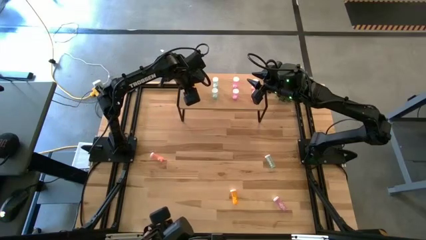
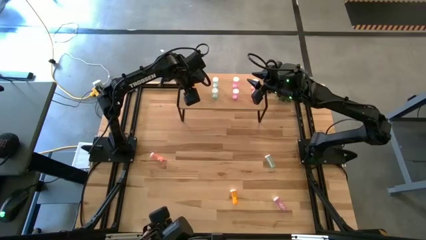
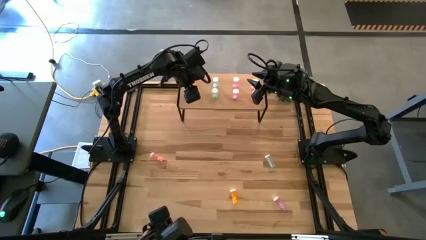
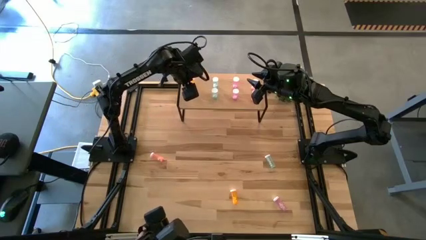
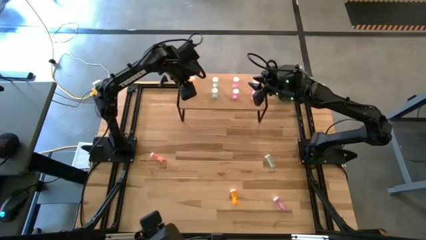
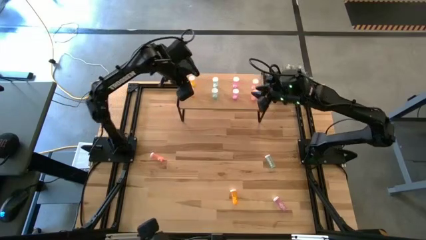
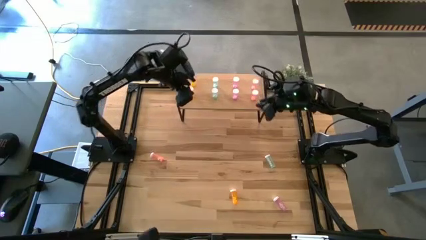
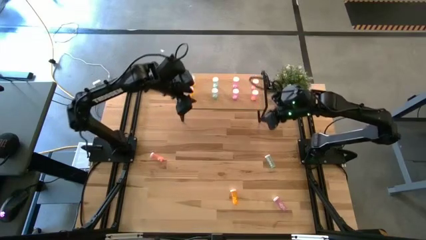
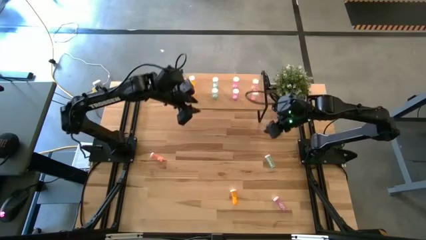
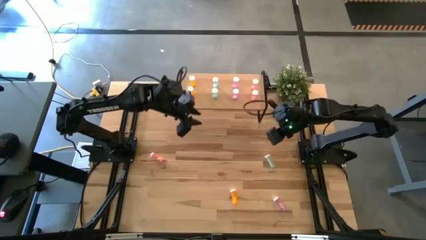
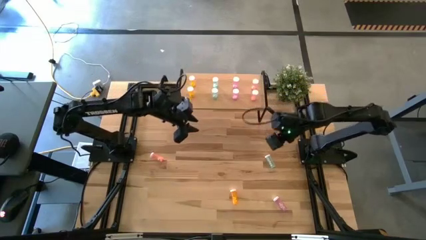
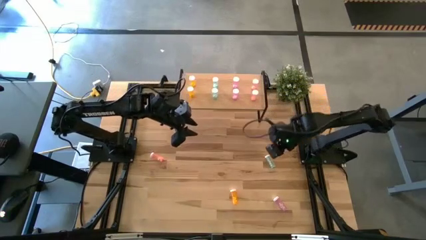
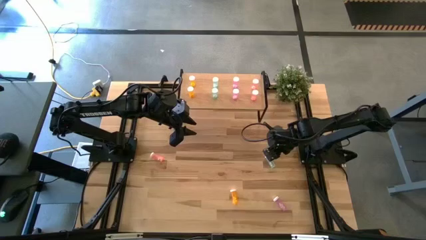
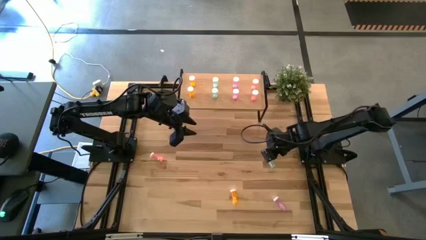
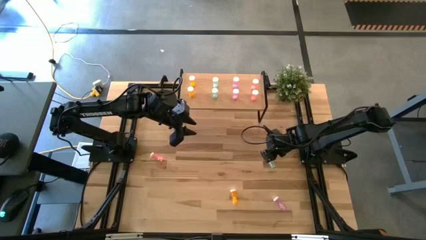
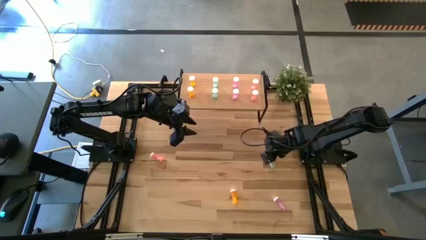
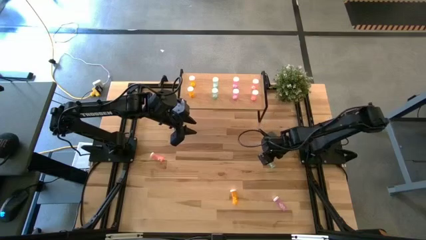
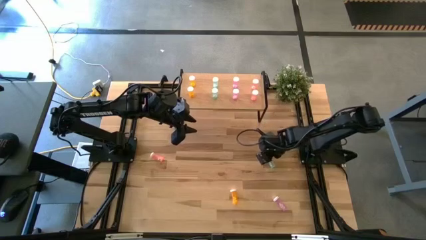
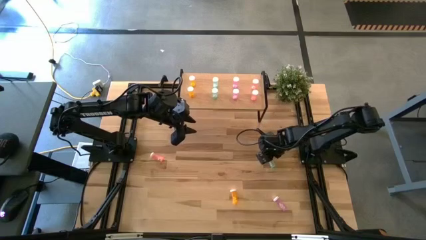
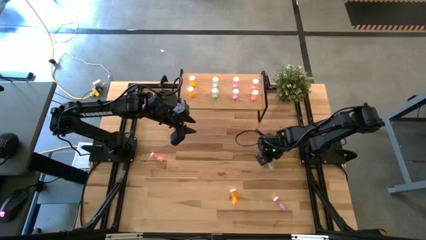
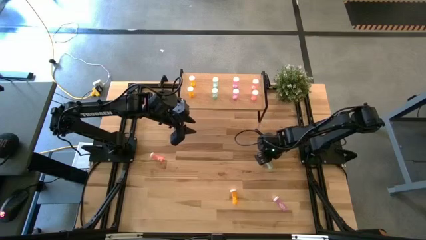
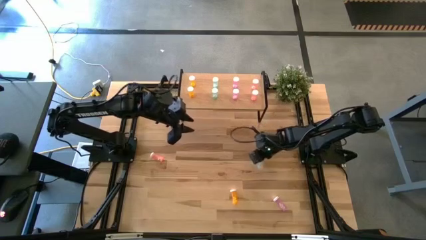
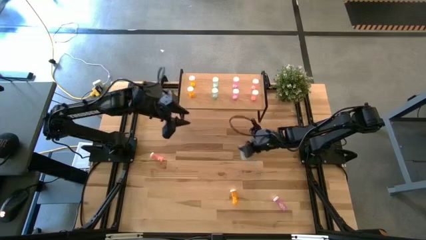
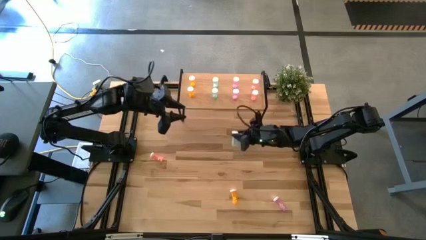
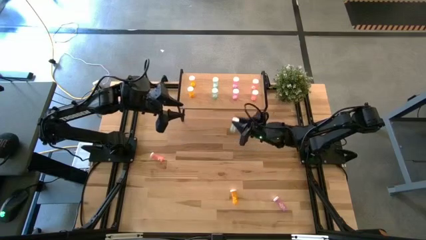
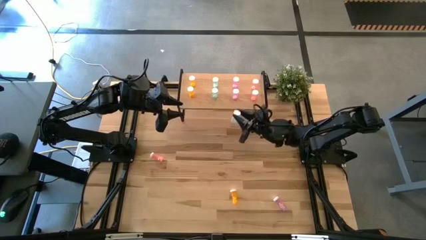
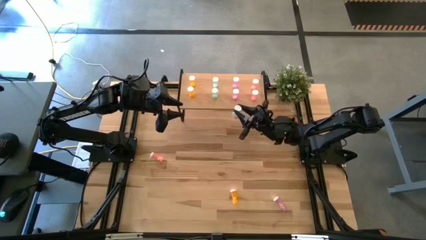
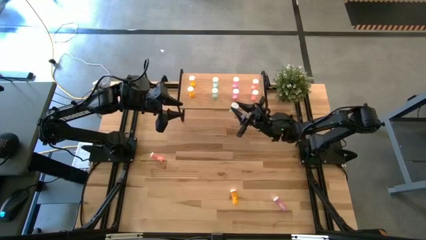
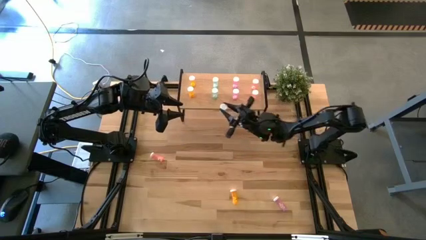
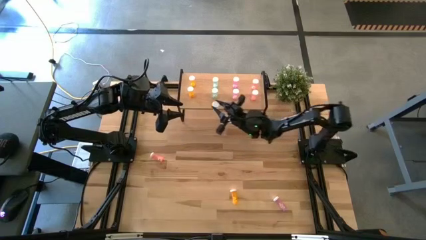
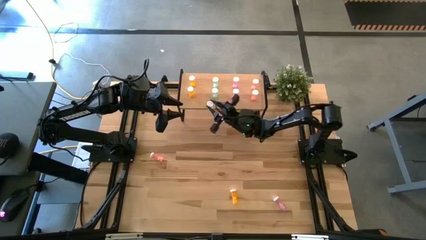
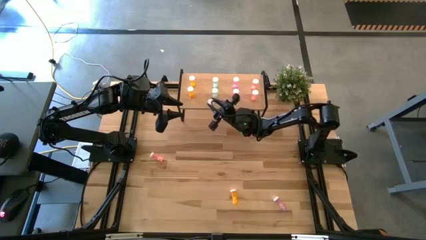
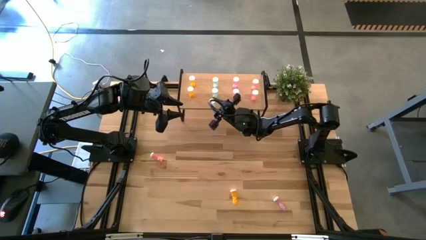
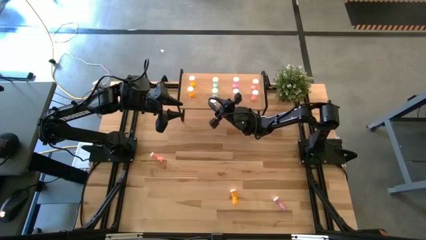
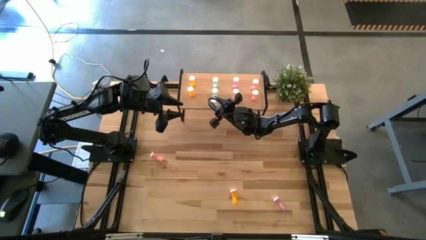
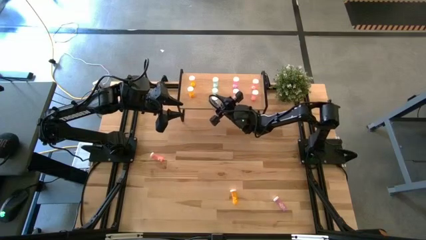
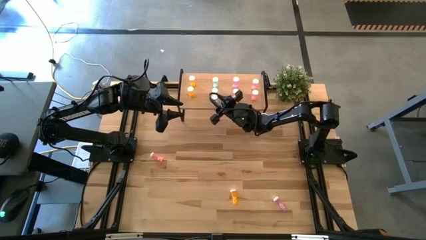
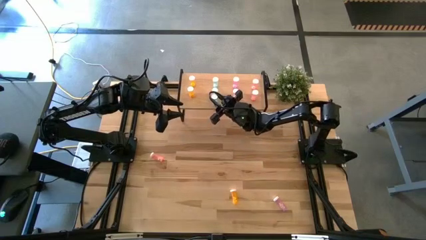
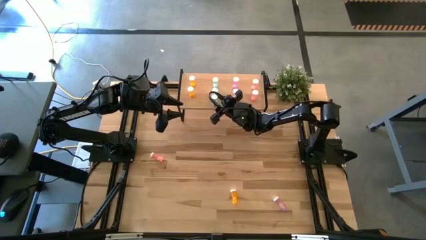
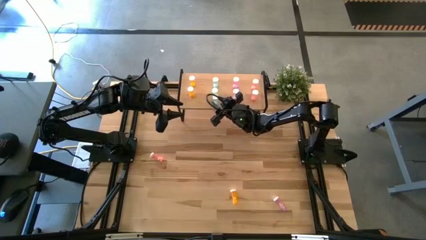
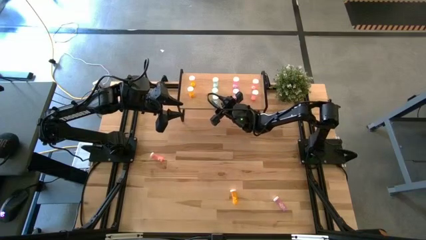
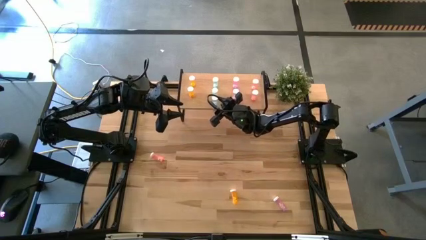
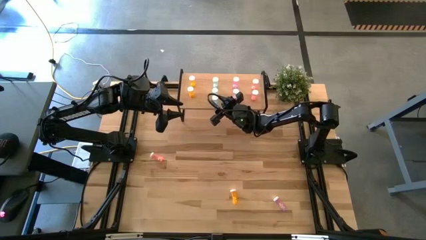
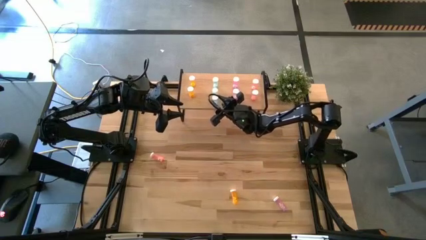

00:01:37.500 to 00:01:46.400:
Task: Pick and place medicine bottles onto shelf by color
Put the green pill bottle aligned with the other green pill bottles

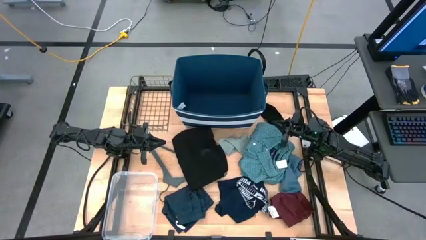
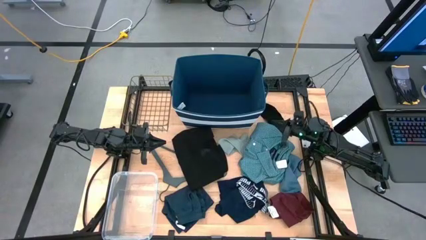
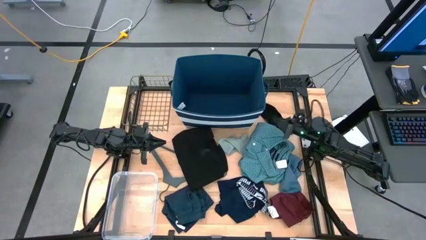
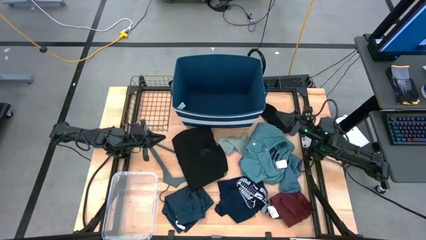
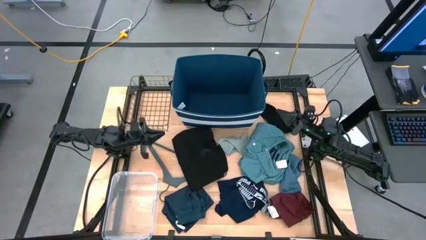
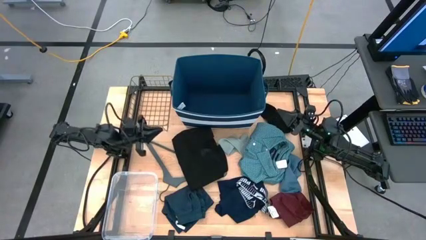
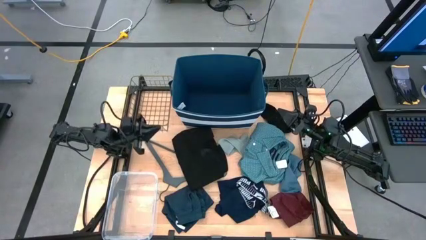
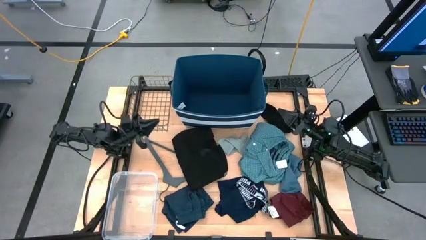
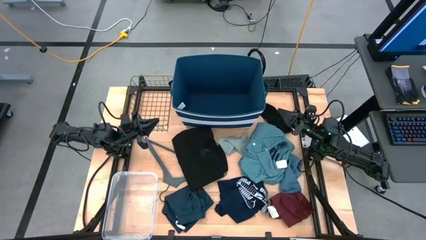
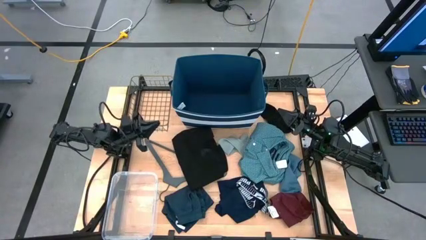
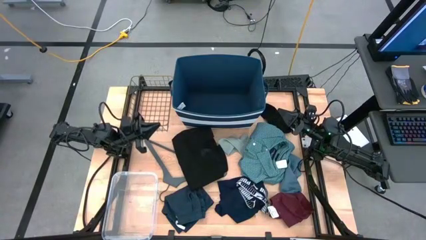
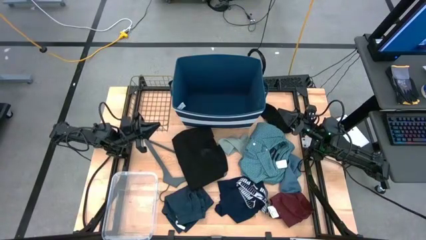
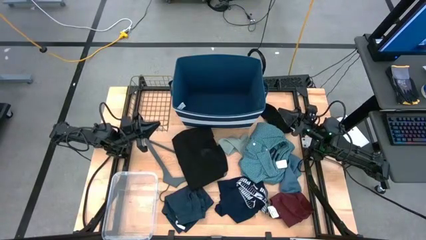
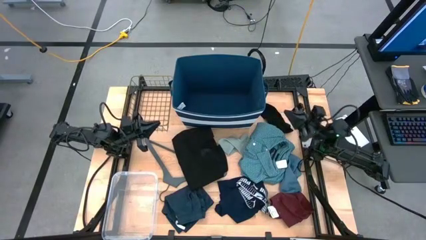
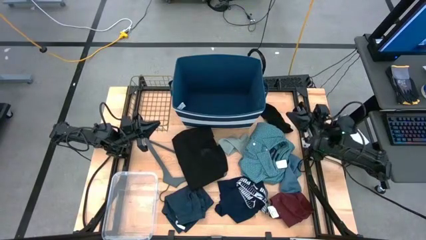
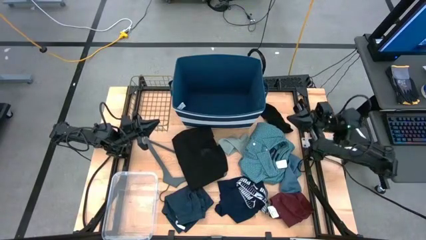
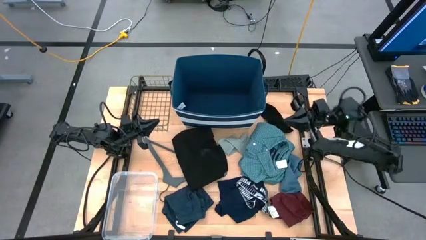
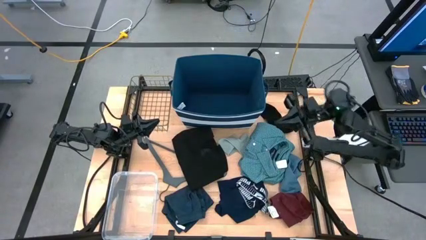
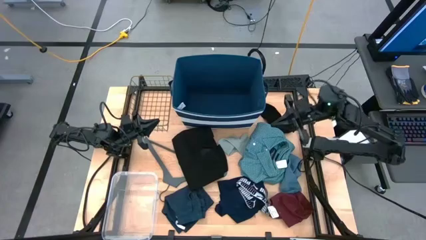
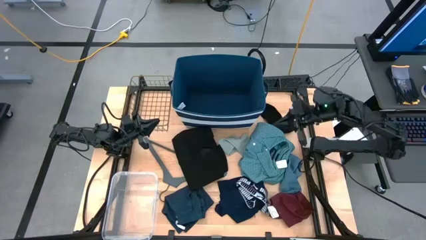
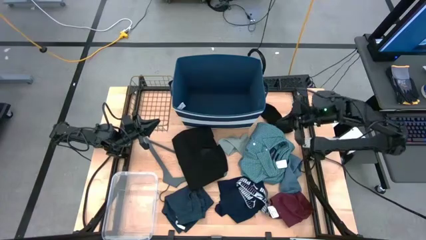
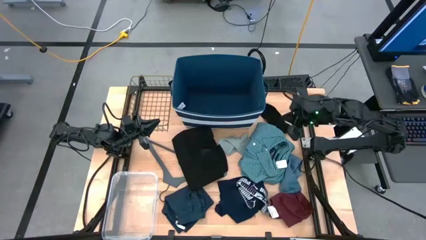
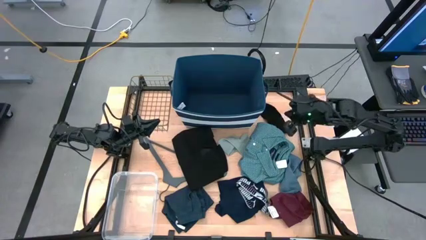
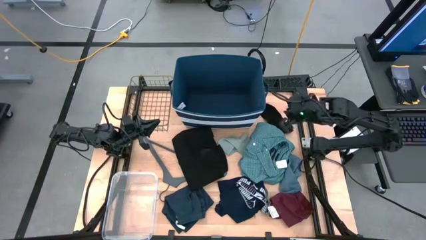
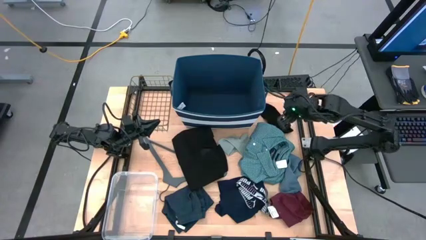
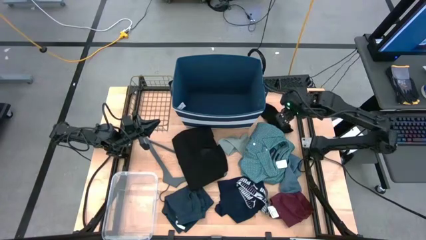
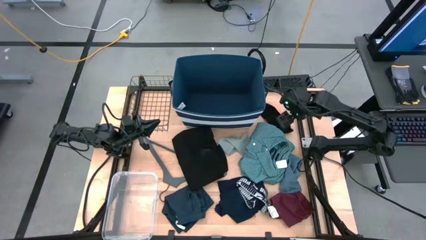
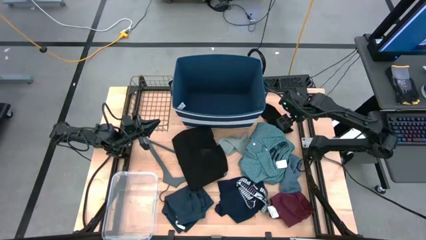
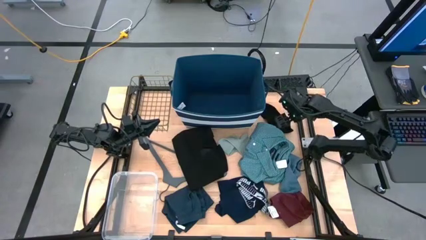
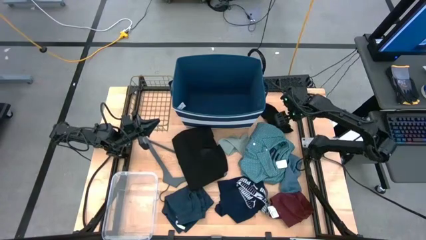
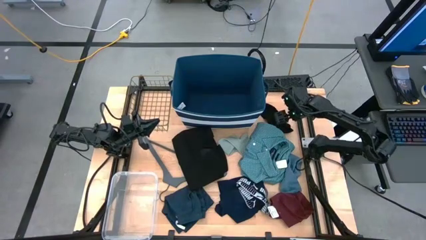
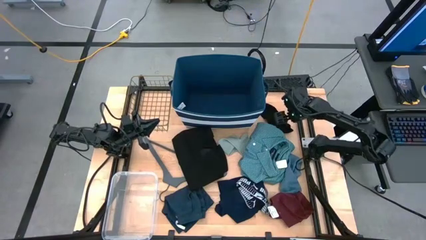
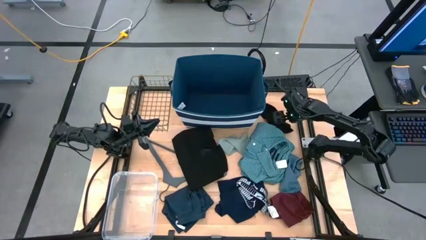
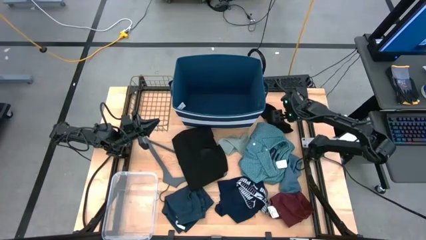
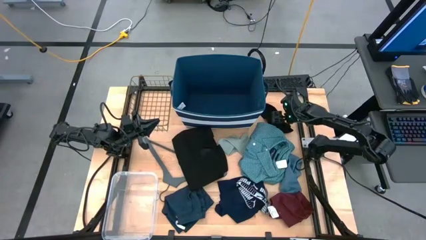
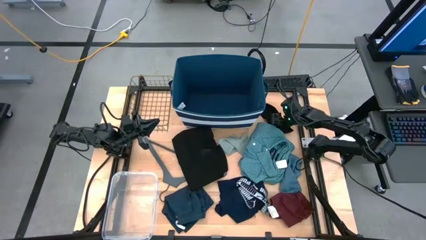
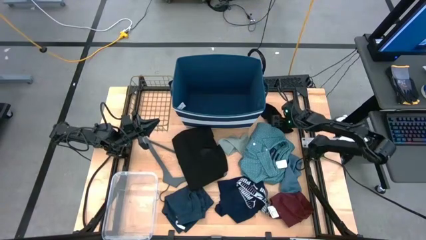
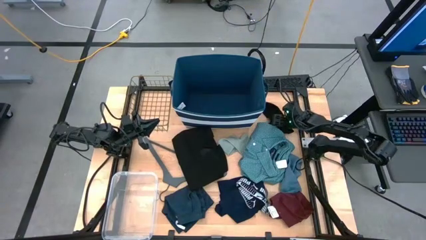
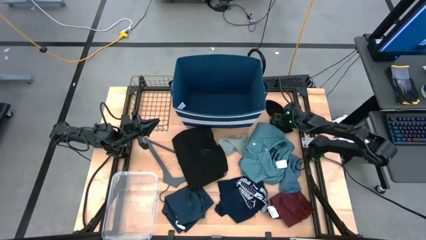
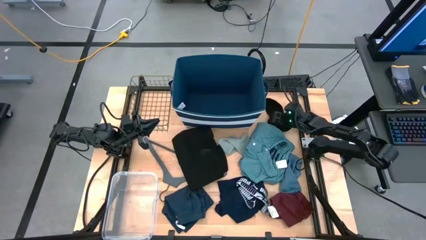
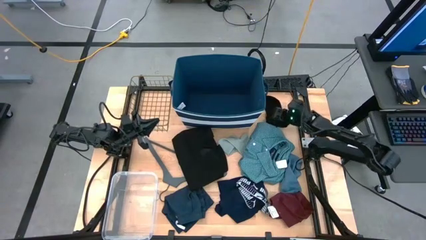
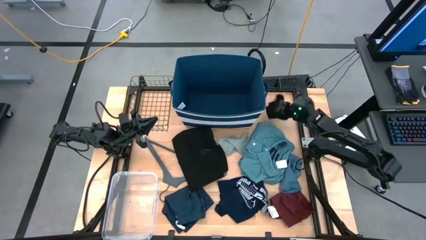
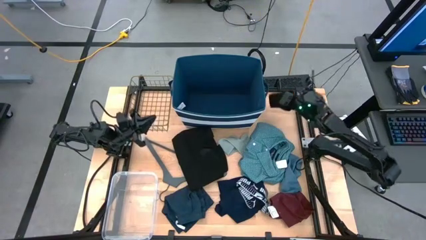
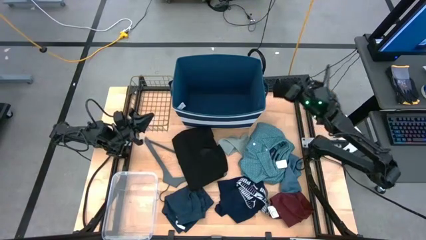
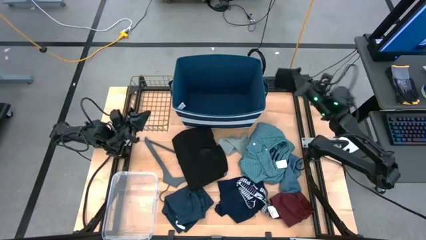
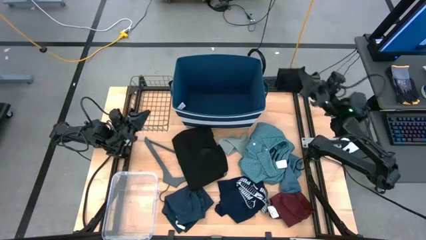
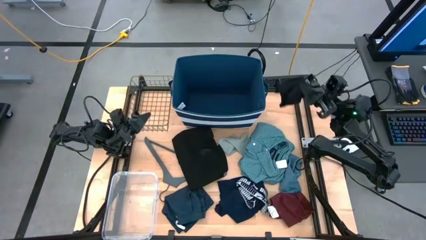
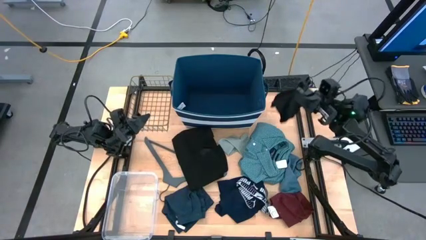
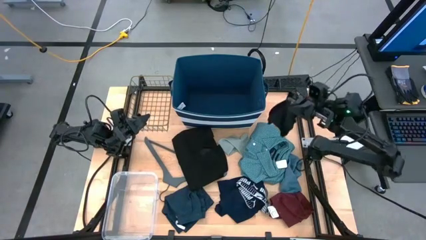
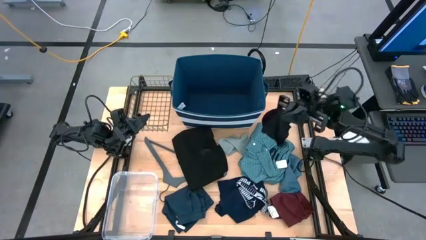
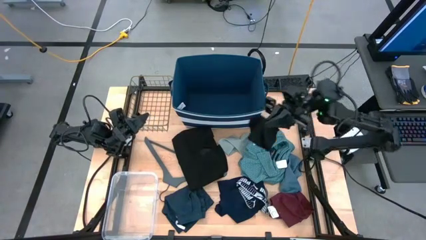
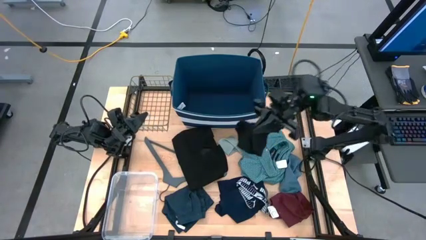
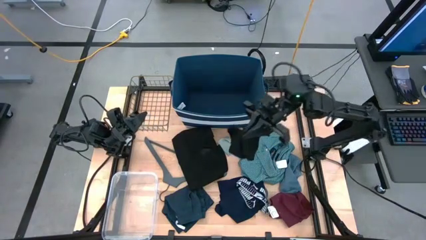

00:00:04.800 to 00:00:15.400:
Task: Pick & Place Cloths
Put the black sock into the transparent container
